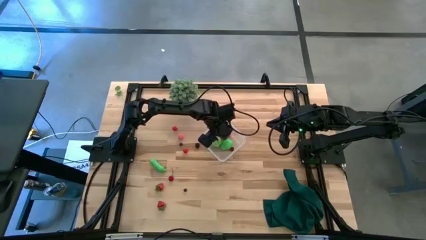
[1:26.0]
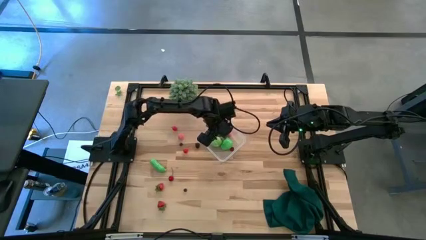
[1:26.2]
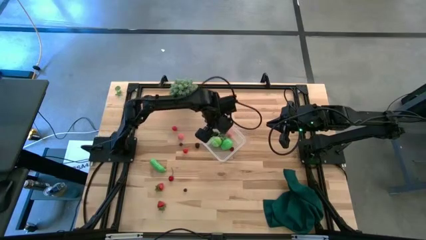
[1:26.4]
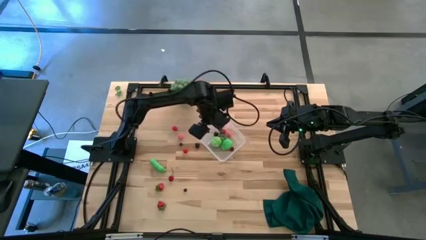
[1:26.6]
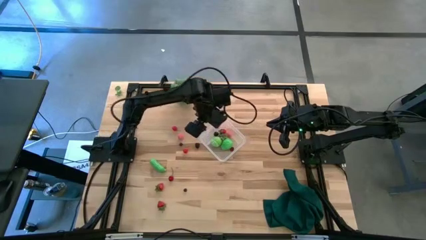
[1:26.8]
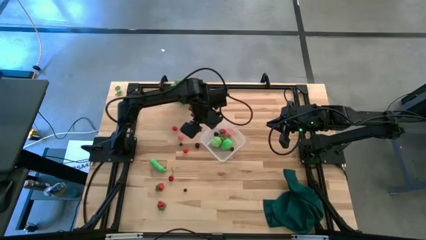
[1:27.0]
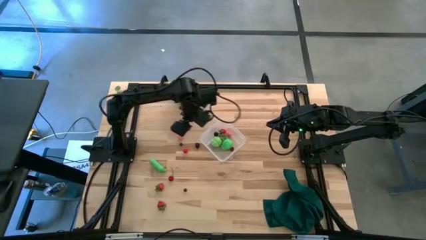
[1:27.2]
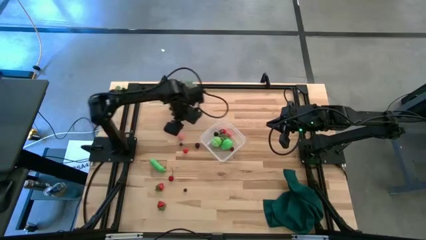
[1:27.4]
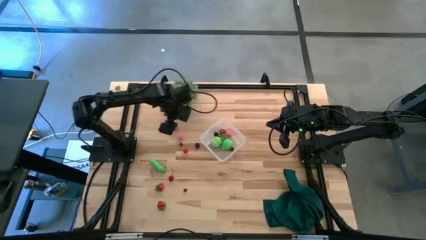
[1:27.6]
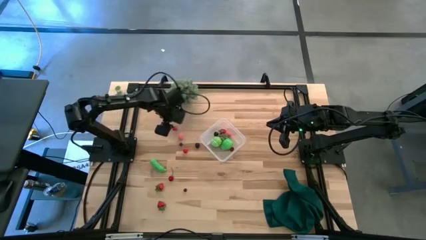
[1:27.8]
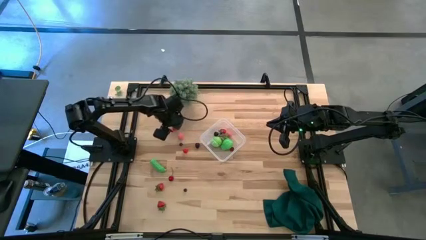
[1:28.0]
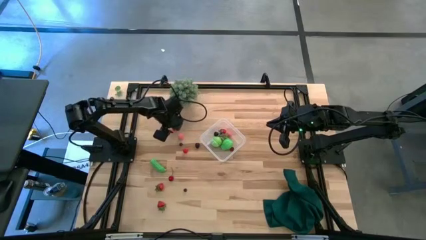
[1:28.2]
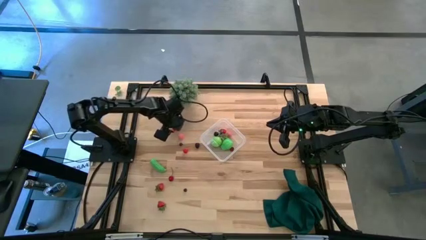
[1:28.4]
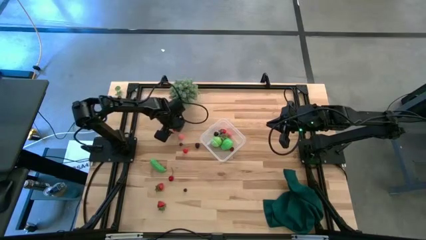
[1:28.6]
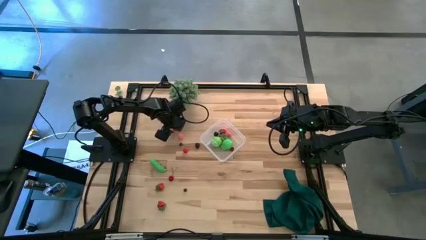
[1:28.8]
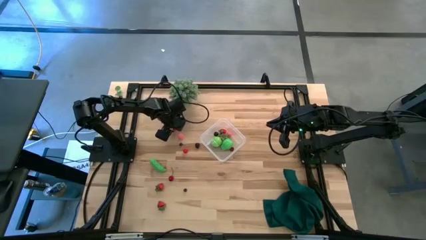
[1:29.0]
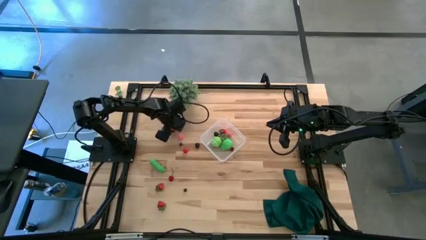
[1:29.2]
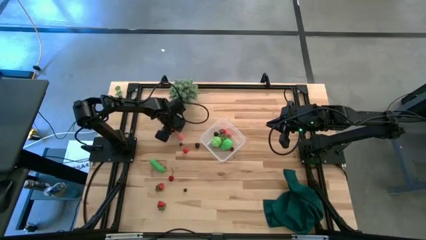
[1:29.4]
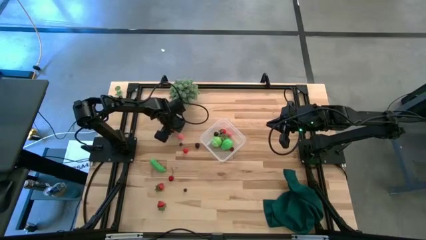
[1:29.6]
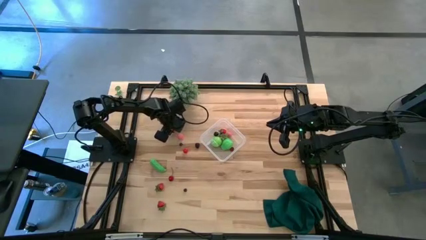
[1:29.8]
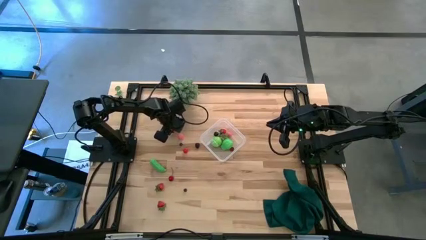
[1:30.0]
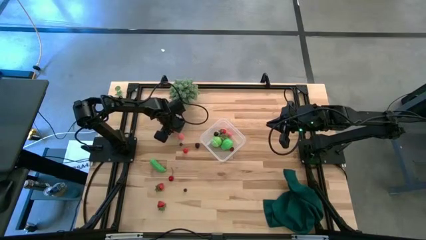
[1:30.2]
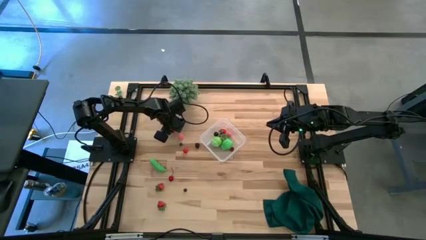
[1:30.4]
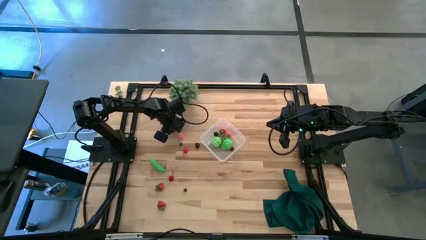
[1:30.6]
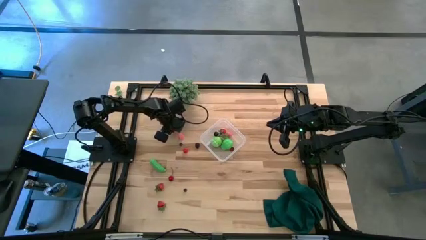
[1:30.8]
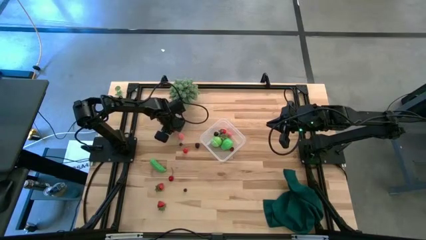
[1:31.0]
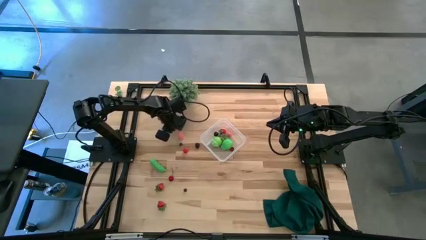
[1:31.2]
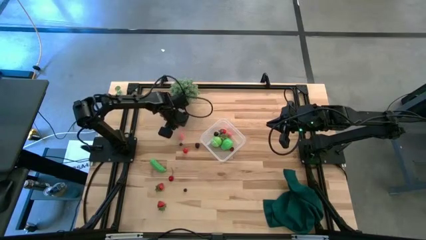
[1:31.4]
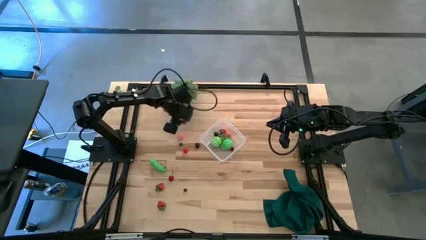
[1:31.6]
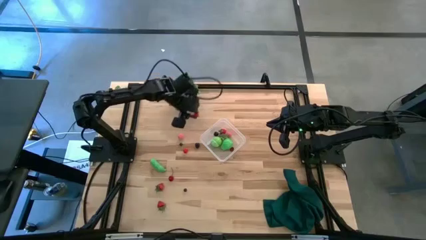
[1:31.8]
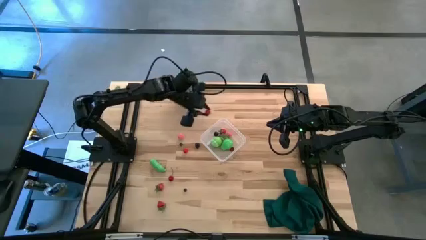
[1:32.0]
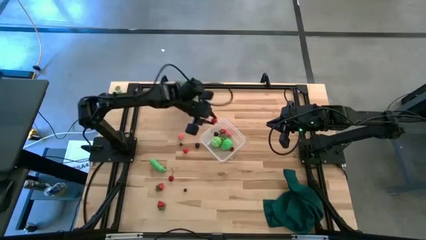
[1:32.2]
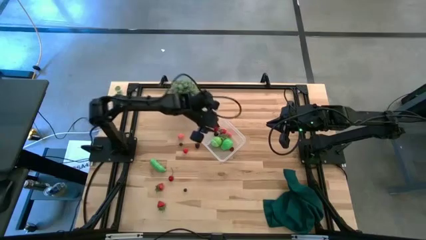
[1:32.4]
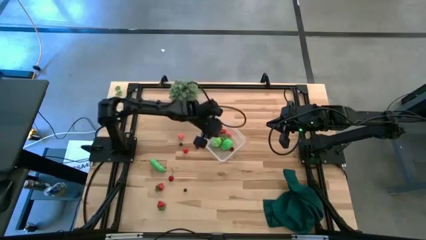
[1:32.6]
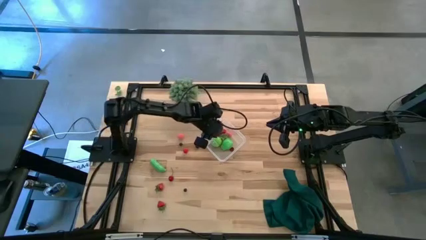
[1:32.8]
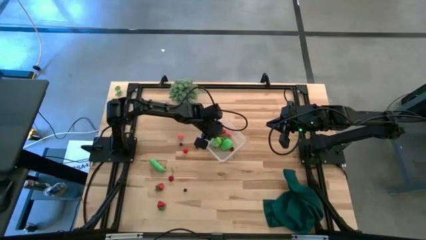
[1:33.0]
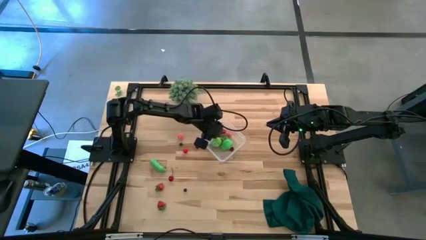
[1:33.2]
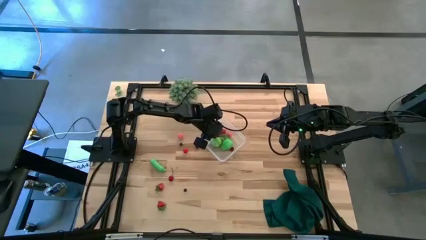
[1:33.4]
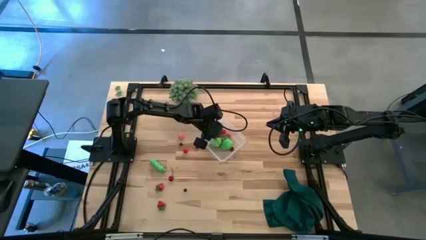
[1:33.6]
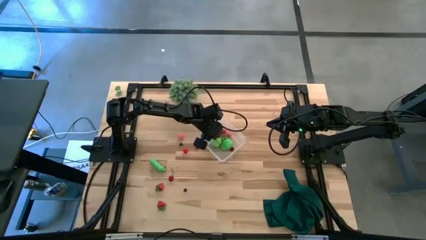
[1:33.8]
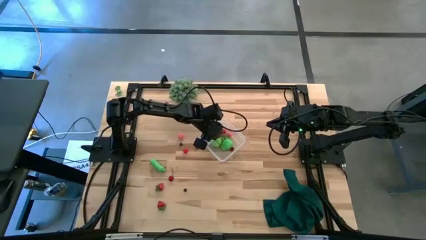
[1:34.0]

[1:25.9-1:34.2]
Task: Pick and placing Produce into tupperware
Put the red cherry into the transparent bin

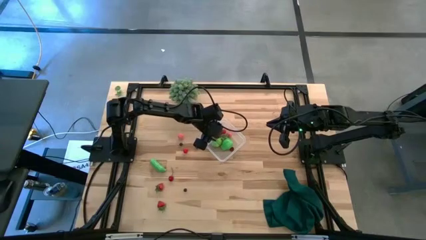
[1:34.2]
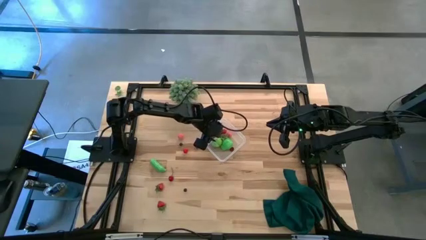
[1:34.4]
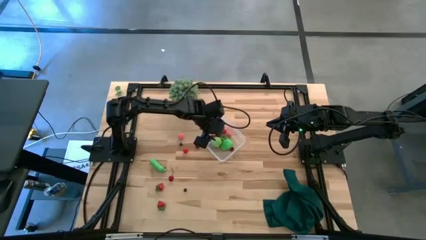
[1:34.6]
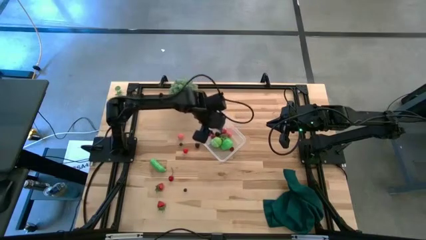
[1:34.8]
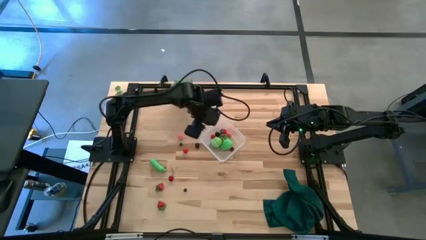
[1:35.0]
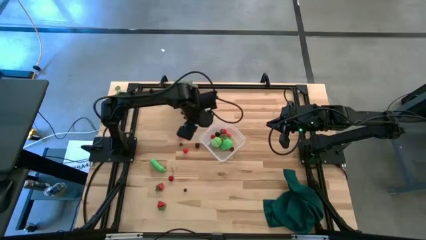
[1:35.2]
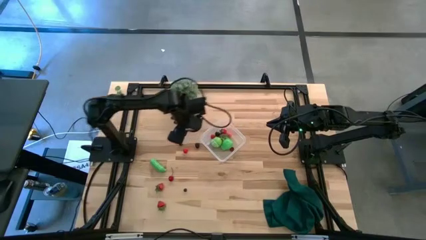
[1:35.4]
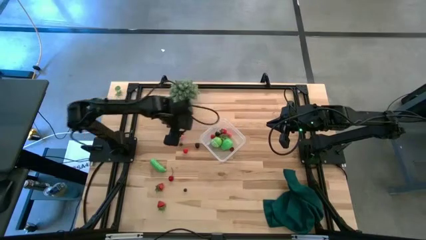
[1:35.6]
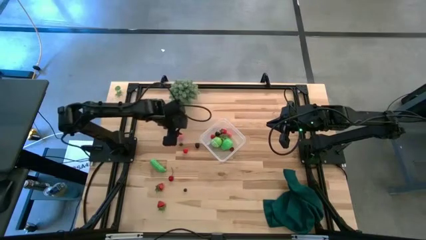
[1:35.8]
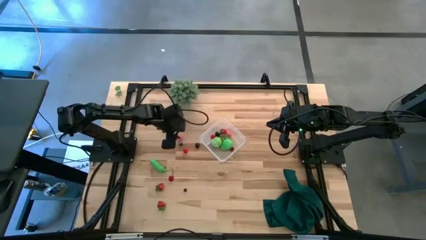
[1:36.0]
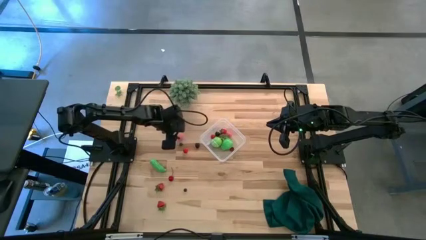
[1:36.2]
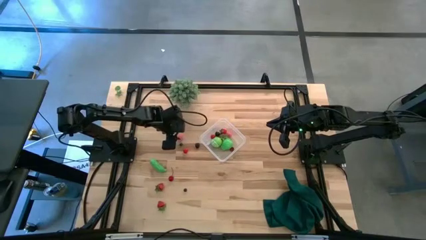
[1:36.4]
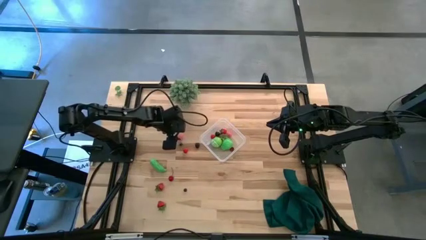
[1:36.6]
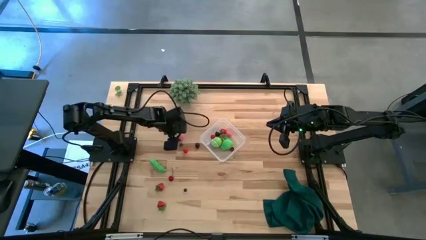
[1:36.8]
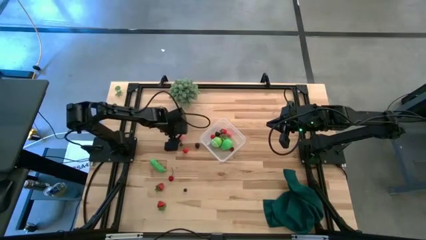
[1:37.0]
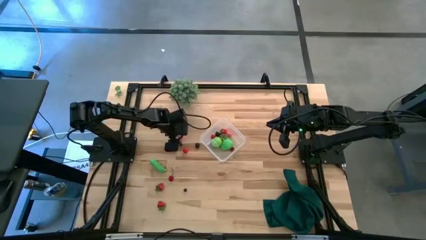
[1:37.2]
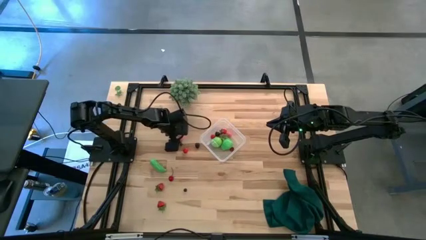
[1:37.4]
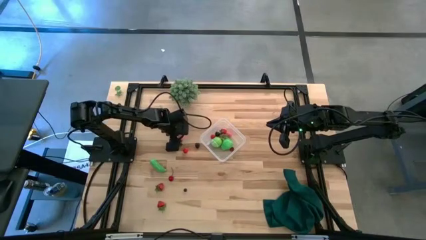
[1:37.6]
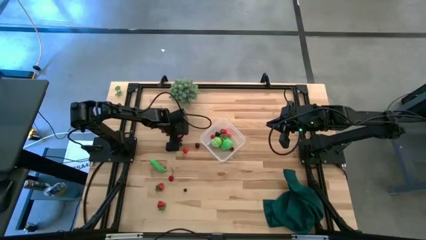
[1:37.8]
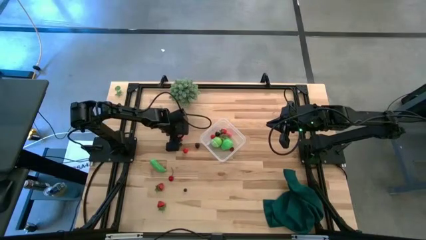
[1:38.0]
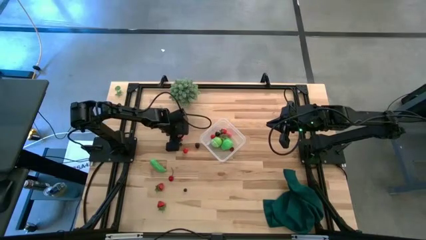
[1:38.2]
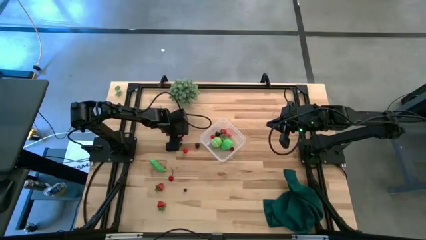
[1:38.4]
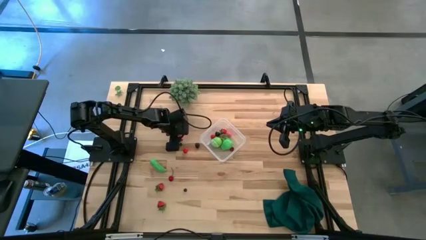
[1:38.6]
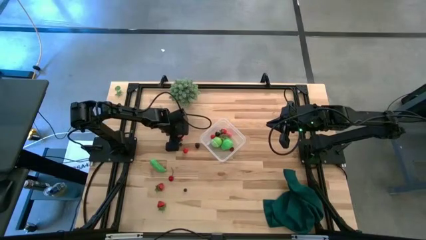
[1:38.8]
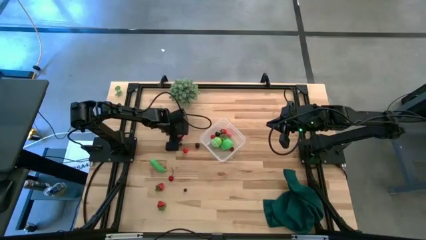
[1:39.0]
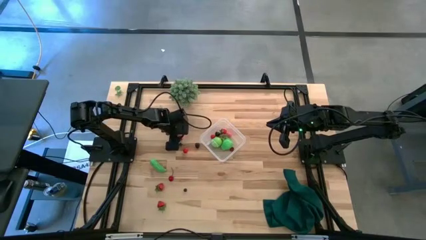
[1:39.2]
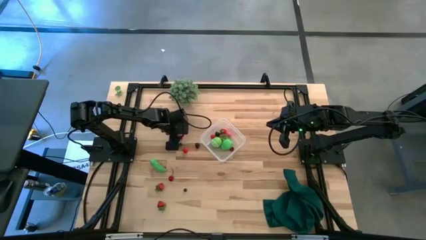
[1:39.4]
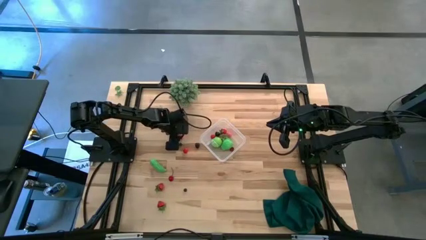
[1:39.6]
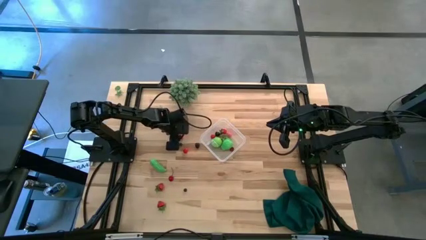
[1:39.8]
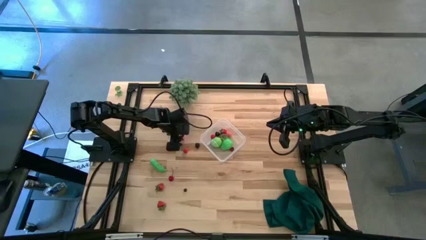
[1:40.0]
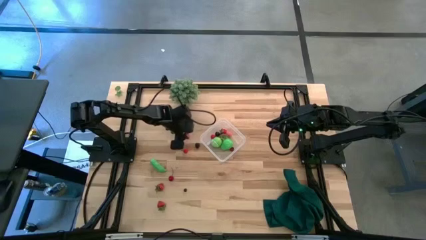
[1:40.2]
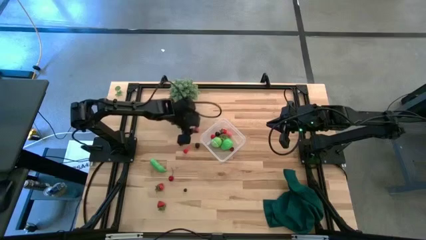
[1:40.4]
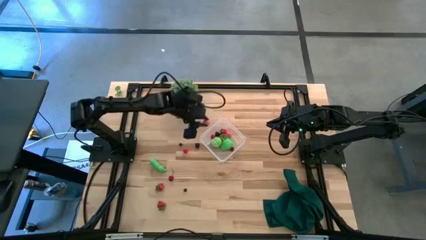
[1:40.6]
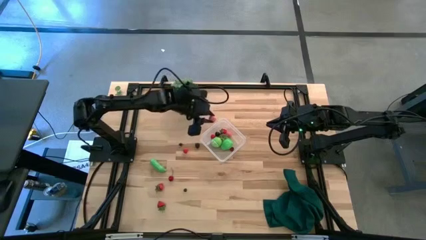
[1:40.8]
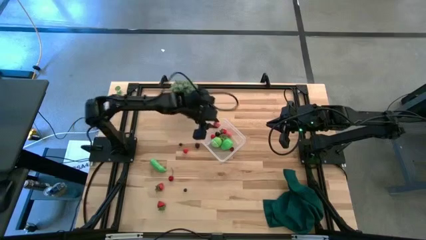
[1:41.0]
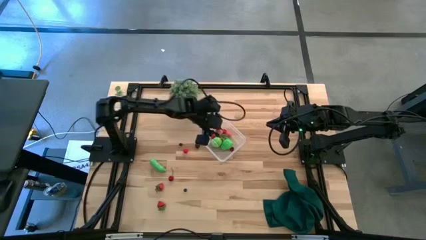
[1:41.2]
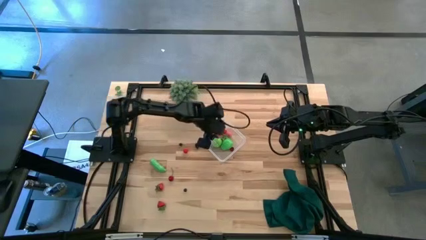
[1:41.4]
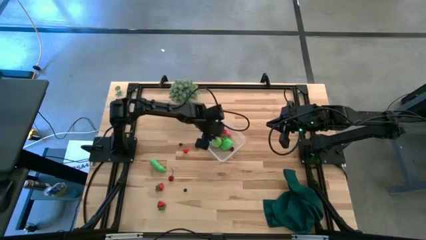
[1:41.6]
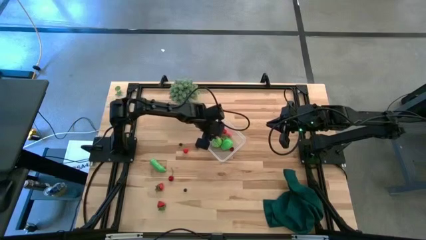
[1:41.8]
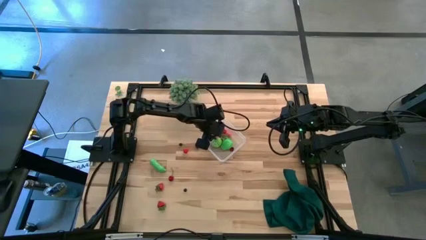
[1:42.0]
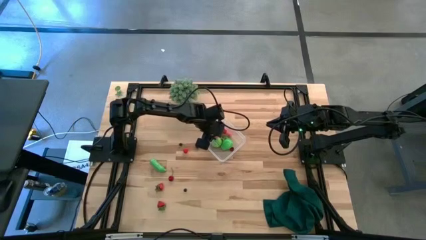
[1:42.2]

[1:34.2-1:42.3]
Put the pink peach into the transparent bin

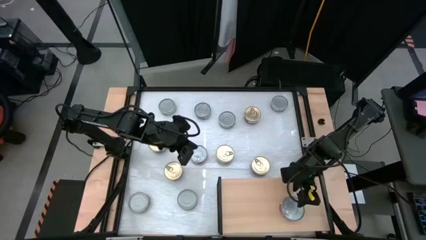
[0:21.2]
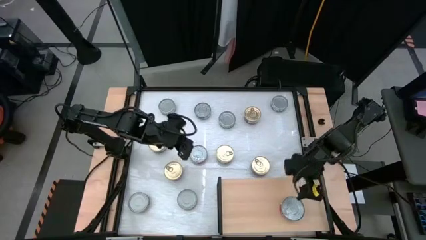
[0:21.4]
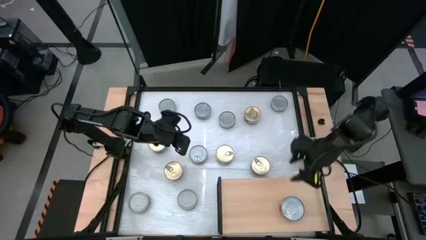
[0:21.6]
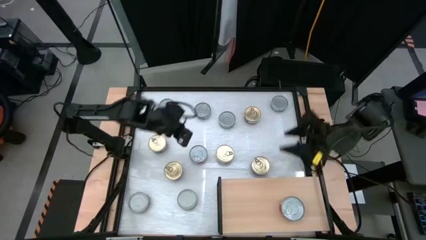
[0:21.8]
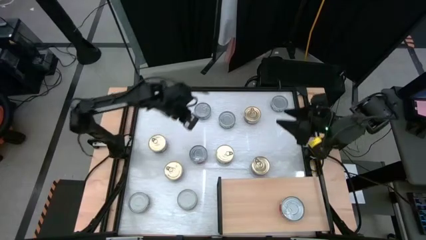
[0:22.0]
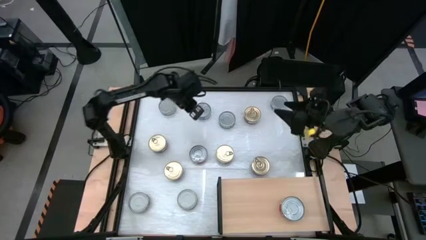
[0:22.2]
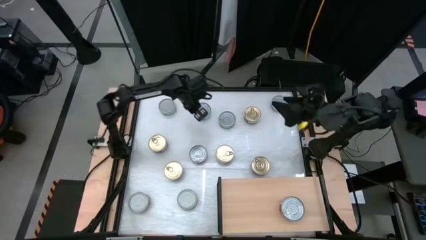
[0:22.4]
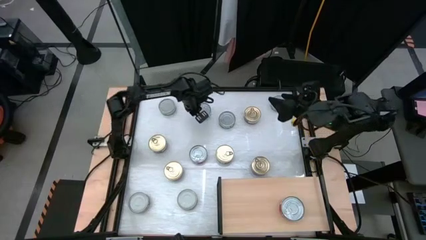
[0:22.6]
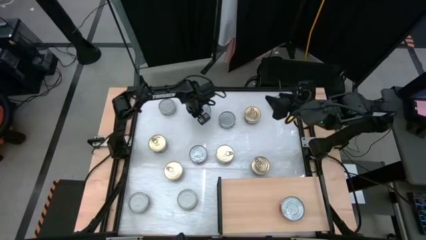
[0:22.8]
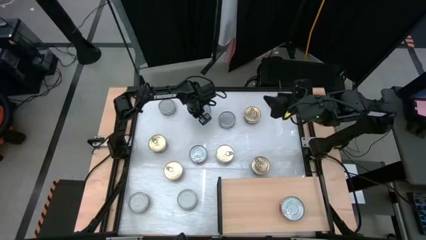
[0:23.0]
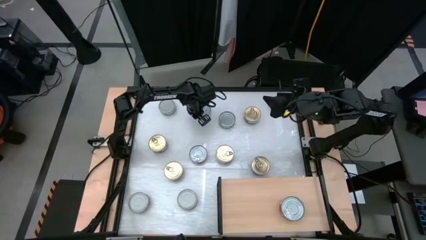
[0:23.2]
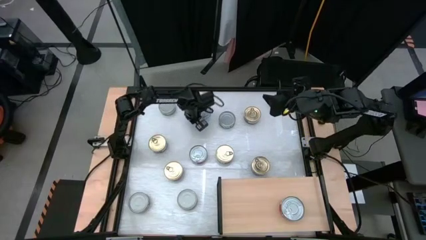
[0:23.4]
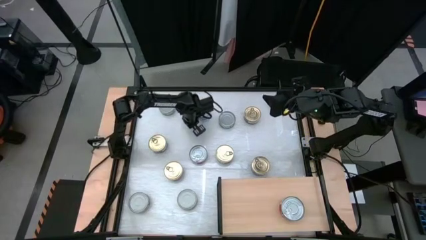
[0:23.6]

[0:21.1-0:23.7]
Task: Stack canned seafood by type on shelf
Put the green-blue tuna can on the shelf
